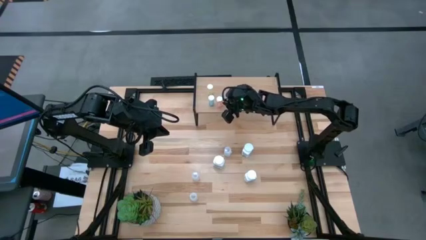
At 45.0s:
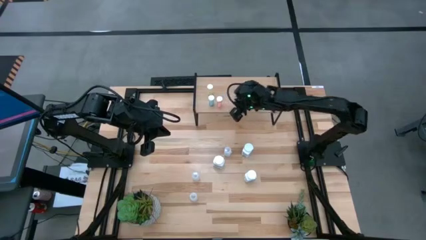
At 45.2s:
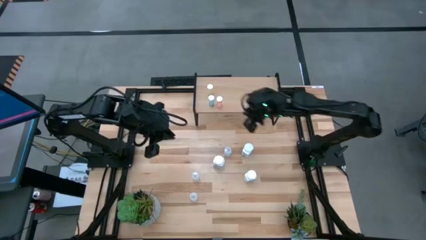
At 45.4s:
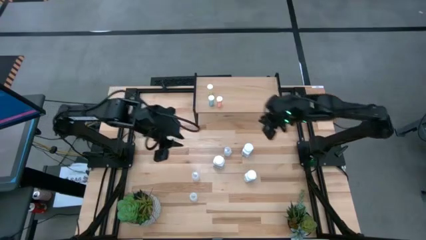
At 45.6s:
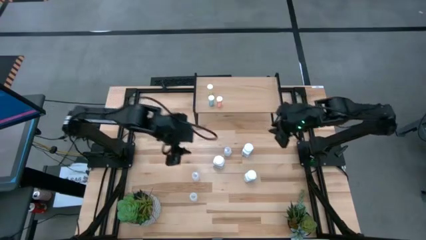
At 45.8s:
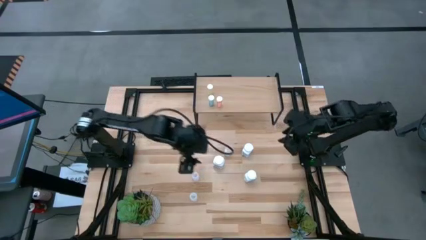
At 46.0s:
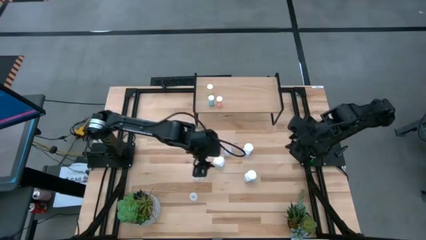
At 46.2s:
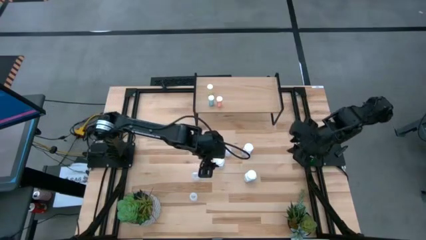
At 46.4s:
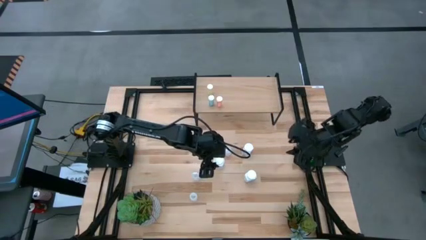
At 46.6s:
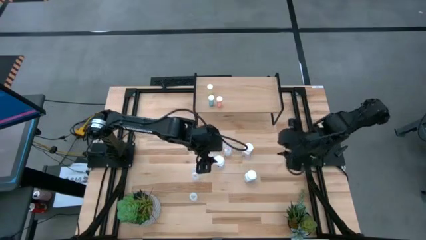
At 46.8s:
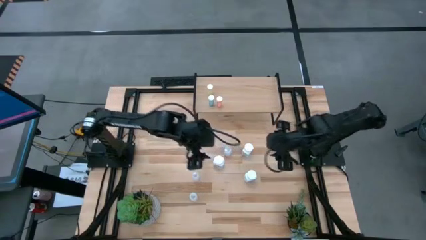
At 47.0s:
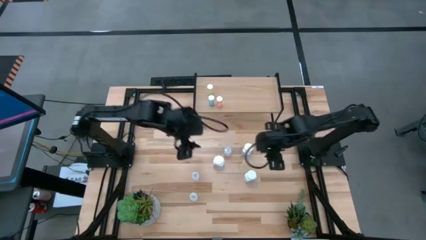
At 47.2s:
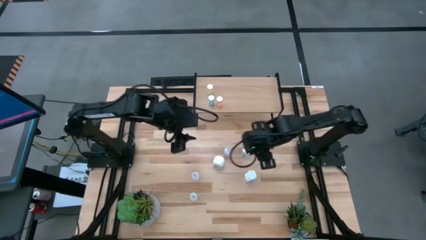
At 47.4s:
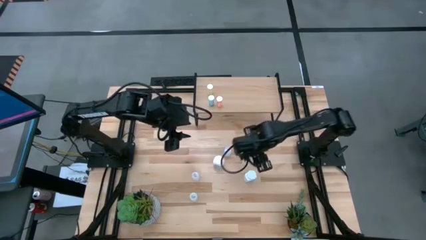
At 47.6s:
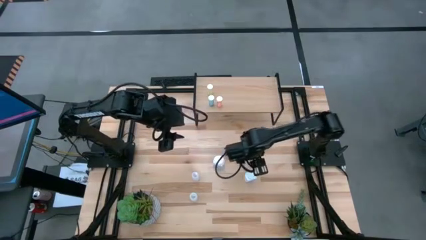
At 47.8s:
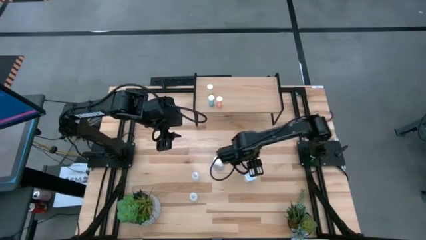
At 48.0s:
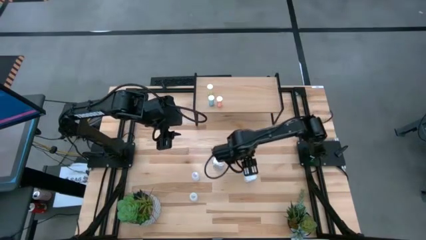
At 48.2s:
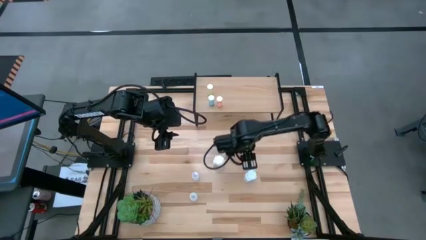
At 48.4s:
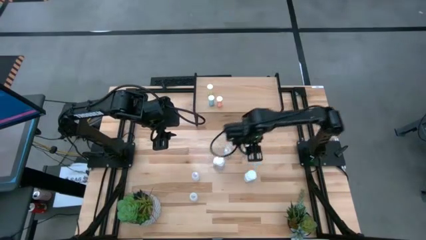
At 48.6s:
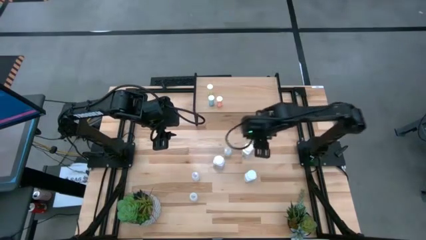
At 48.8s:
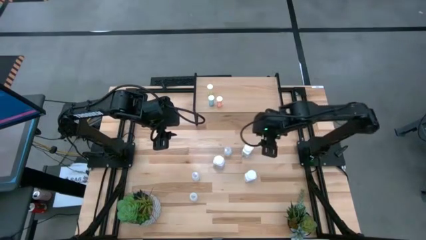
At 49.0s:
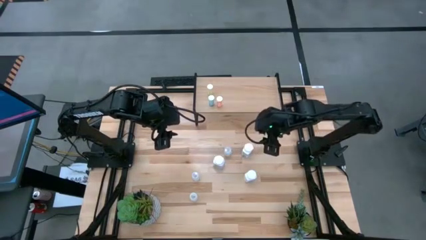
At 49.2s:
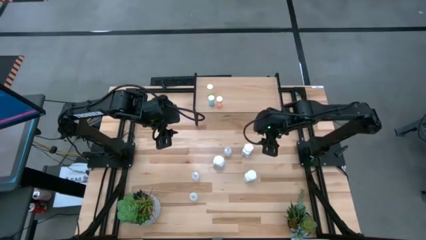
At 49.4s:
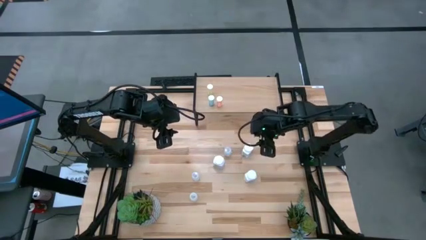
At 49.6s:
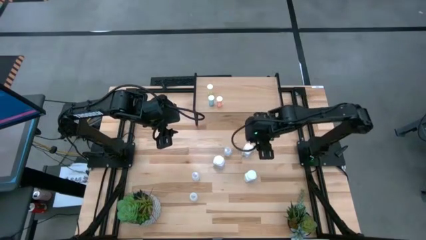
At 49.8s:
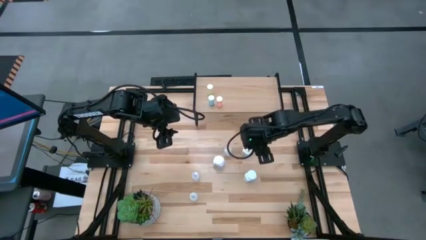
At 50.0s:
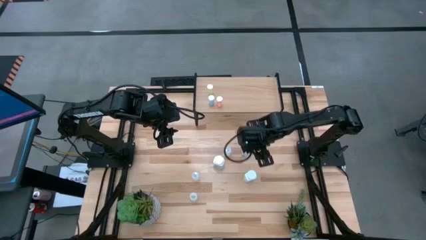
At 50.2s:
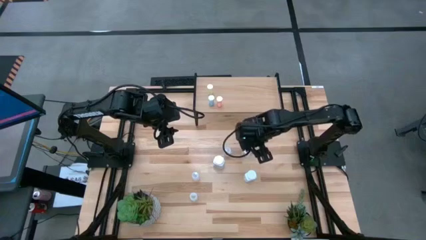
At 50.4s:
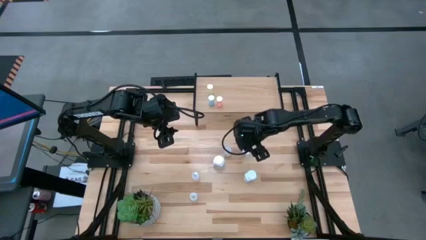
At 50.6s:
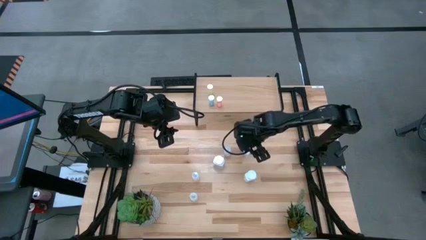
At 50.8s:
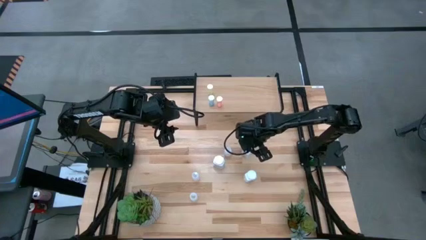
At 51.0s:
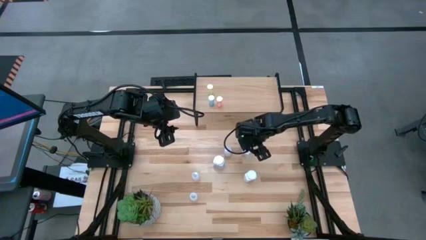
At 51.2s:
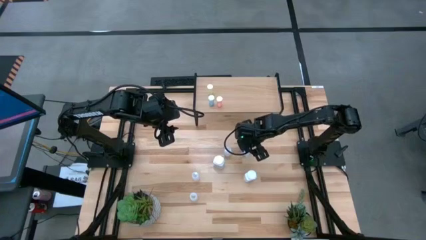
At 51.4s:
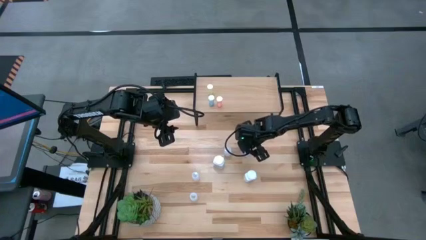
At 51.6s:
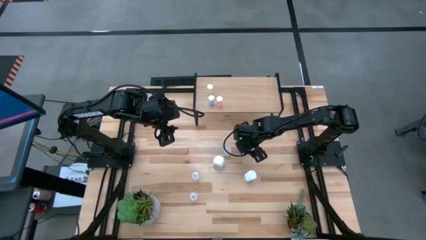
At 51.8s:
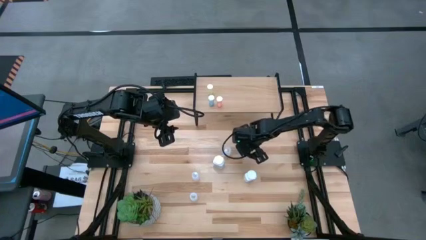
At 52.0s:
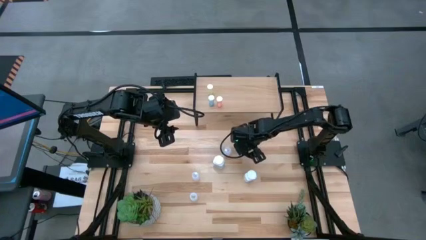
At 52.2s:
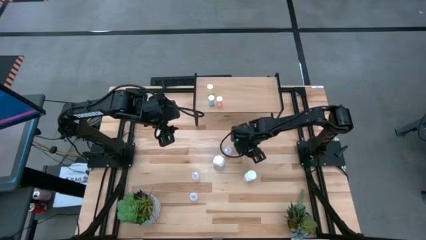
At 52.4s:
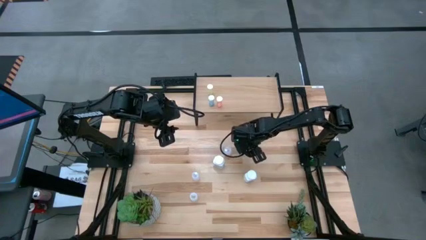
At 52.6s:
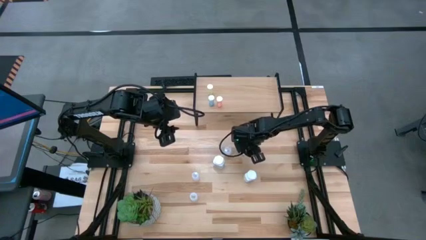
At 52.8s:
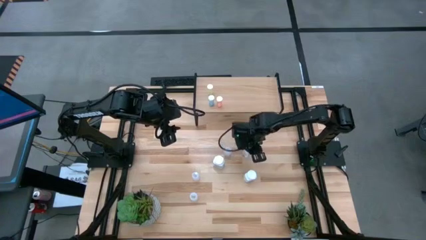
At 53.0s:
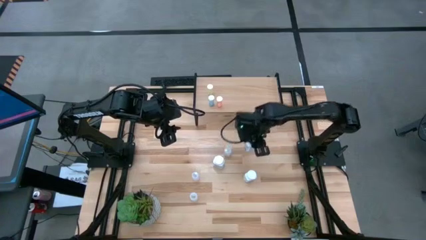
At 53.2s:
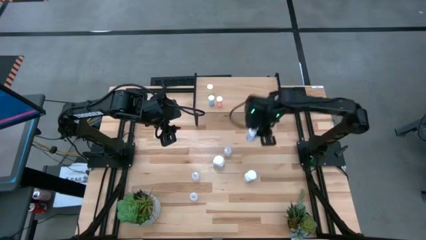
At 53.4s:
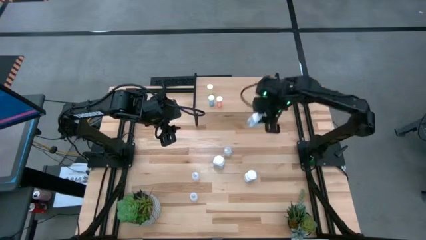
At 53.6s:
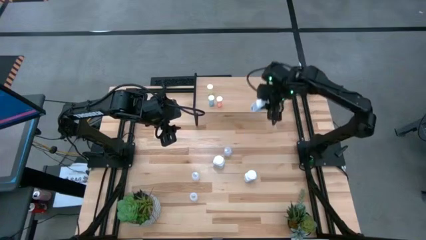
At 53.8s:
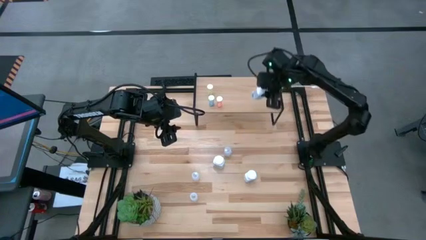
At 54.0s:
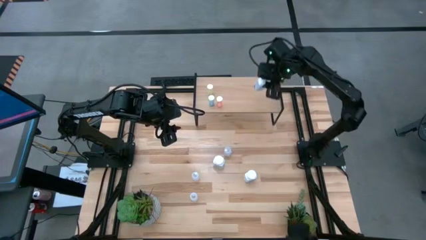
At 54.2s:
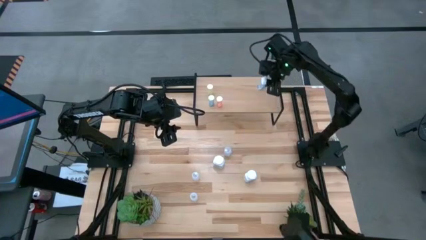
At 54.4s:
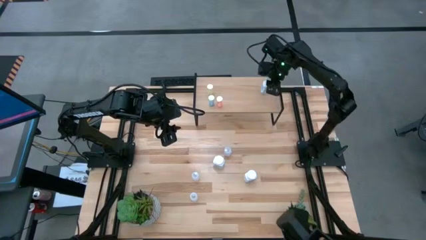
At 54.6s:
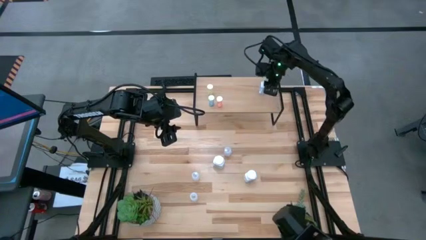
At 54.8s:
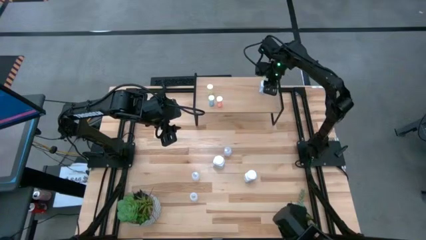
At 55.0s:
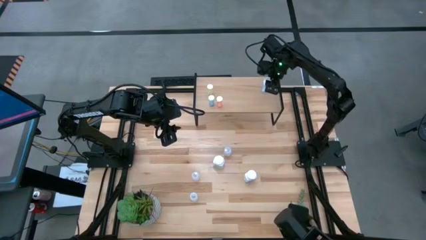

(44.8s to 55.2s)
Task: Pick and place medicine bottles onto shelf by color
Put the top white pill bottle on the shelf

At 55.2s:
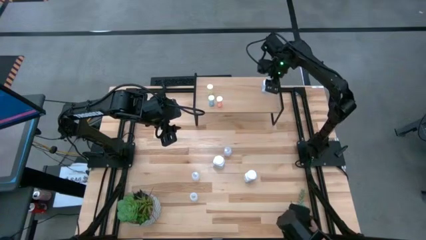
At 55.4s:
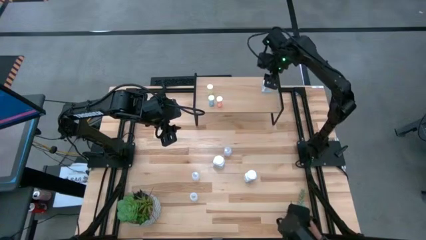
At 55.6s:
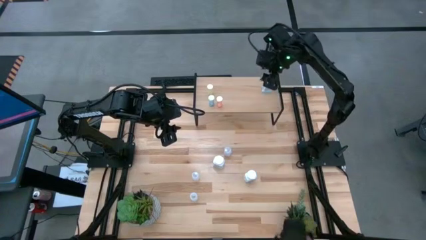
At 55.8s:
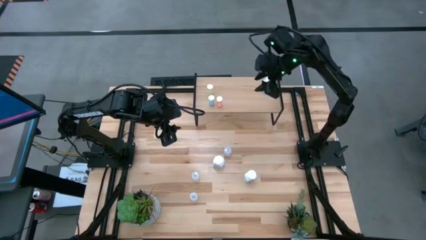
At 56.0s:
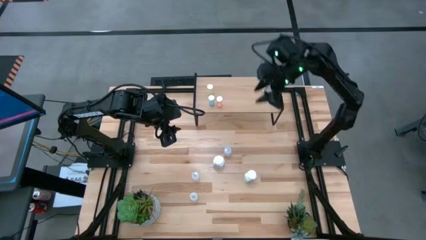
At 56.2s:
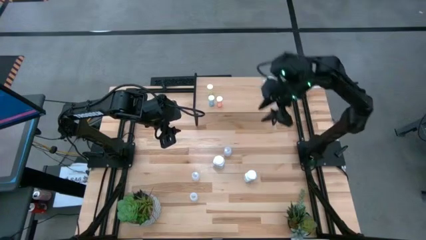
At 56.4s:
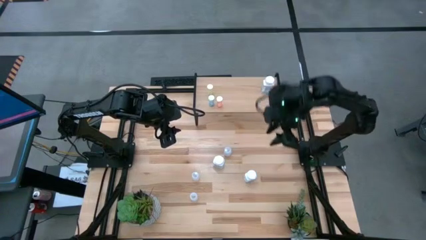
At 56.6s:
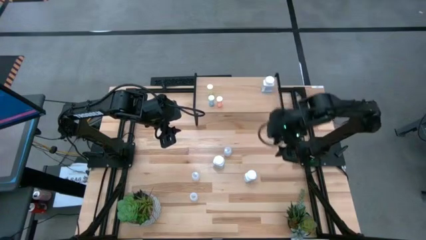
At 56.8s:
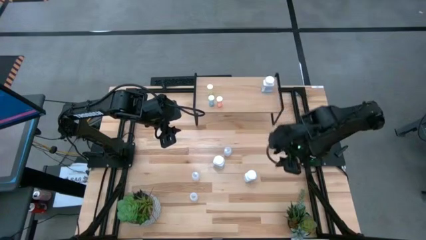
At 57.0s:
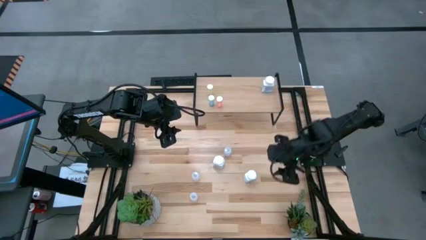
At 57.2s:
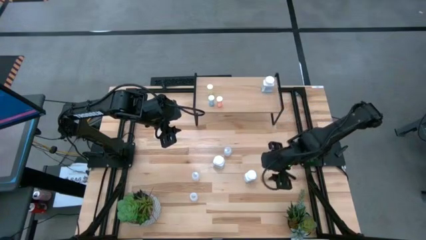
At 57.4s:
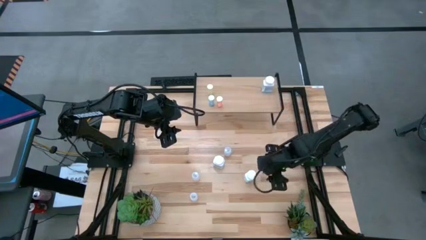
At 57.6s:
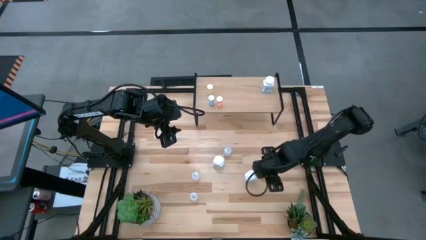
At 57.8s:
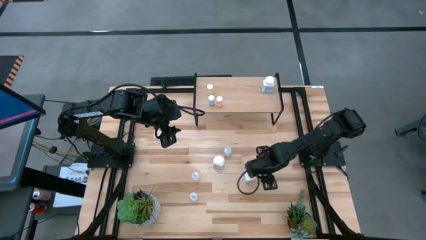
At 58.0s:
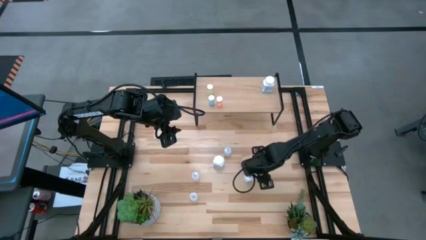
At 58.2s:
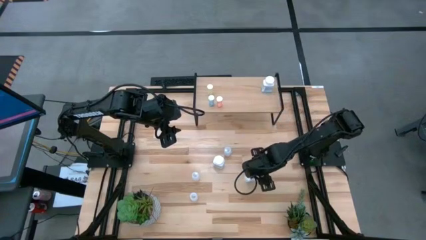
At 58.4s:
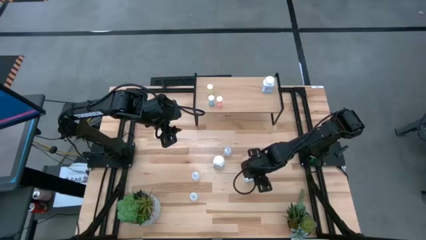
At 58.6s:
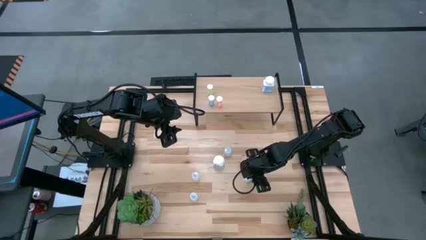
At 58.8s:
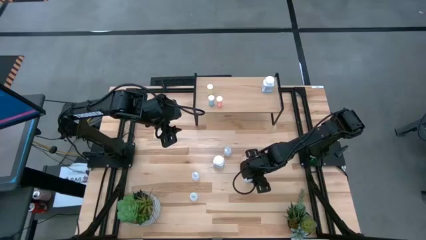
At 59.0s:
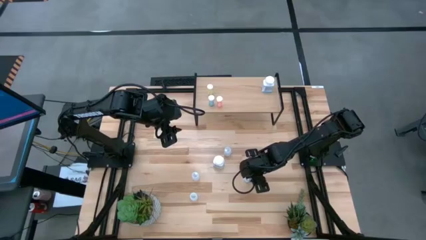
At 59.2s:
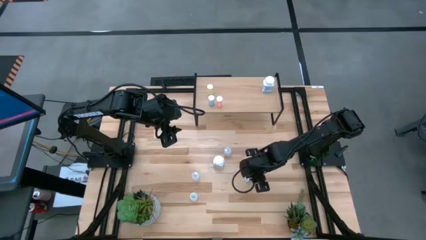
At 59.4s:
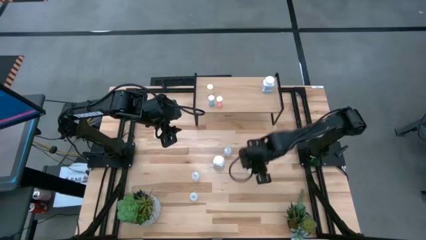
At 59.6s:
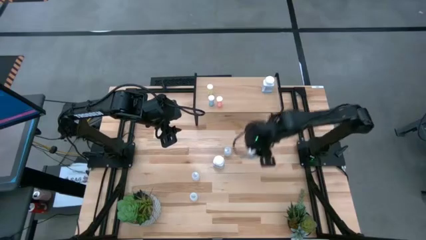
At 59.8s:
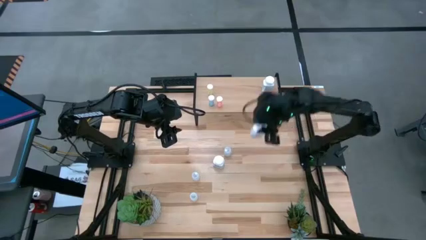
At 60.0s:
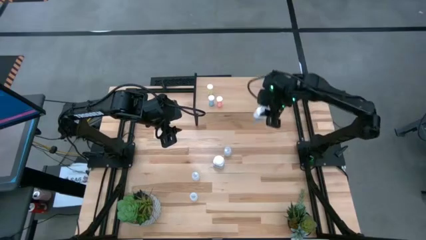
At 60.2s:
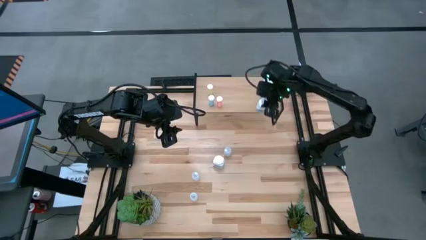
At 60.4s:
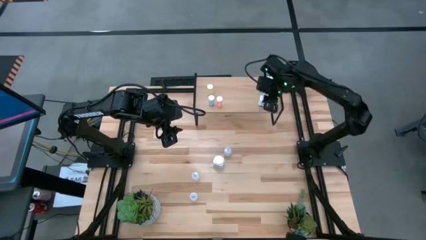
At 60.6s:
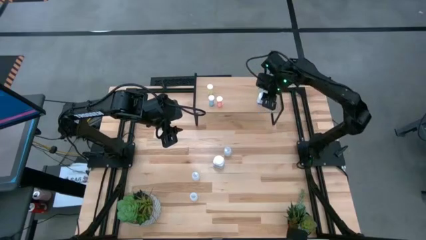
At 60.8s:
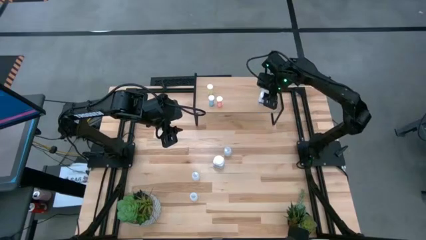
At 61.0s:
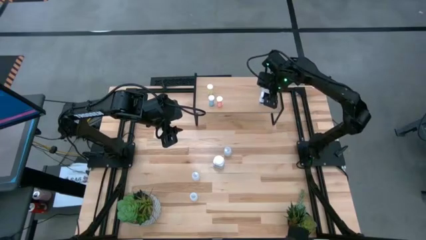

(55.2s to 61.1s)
Align the right white pill bottle with the other white pill bottle on the shelf

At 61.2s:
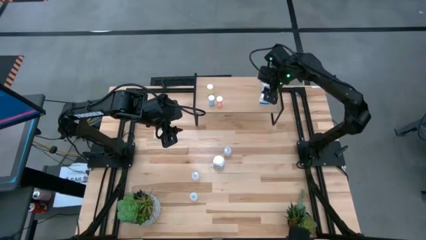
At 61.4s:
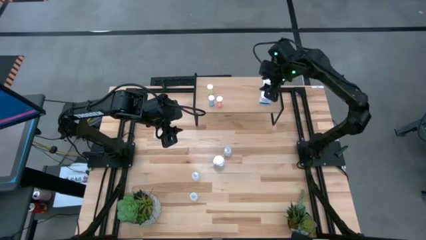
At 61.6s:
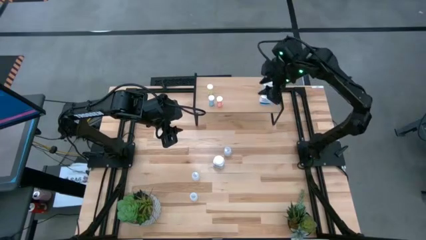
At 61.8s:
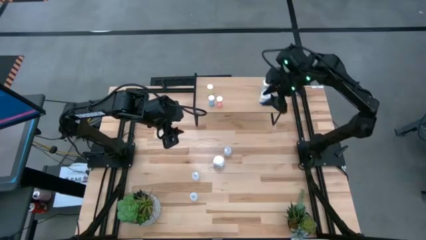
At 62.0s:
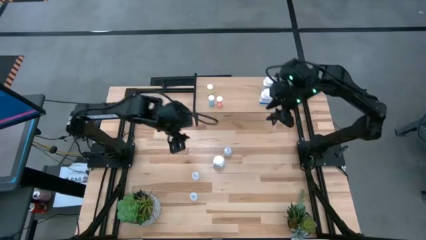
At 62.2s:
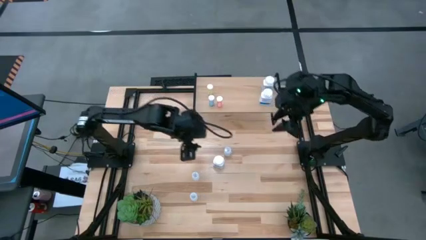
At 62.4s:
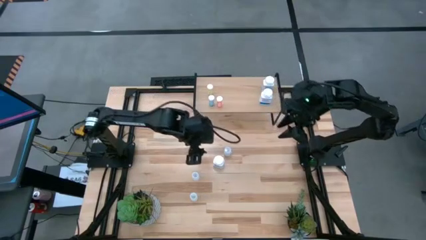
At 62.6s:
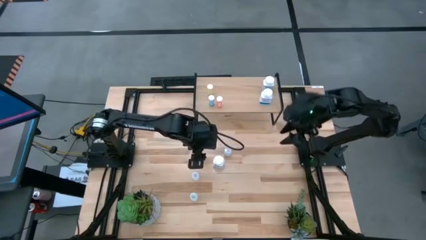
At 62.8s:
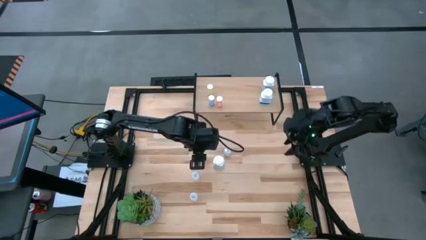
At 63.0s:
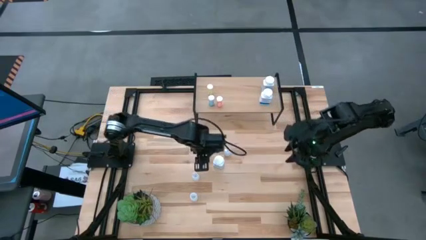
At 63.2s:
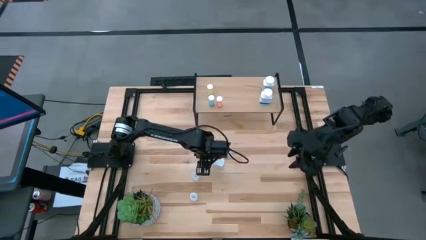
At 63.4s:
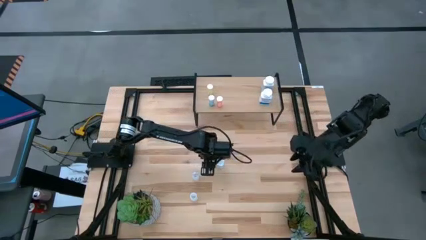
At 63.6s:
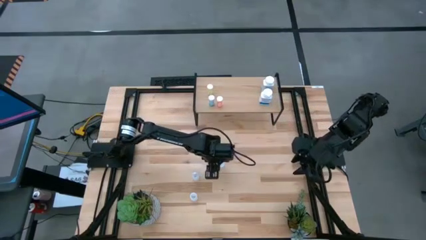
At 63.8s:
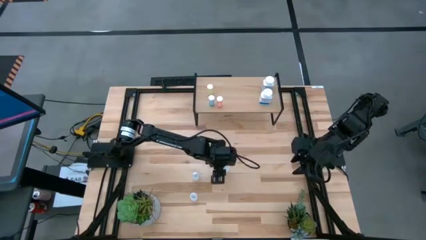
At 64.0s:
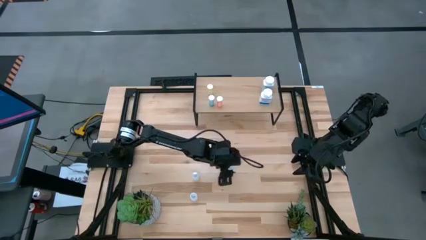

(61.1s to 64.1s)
Align the white pill bottle with the other white pill bottles on the shelf
